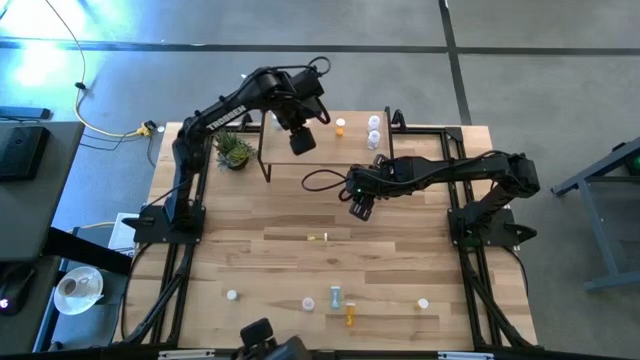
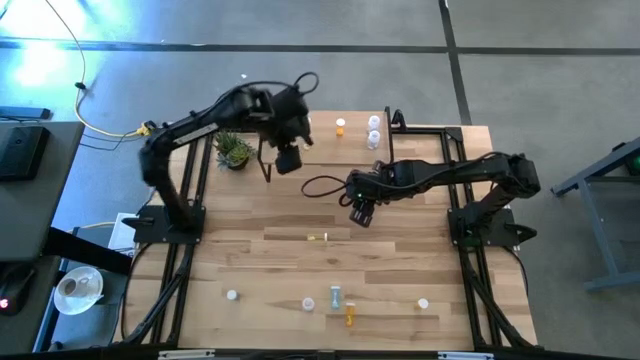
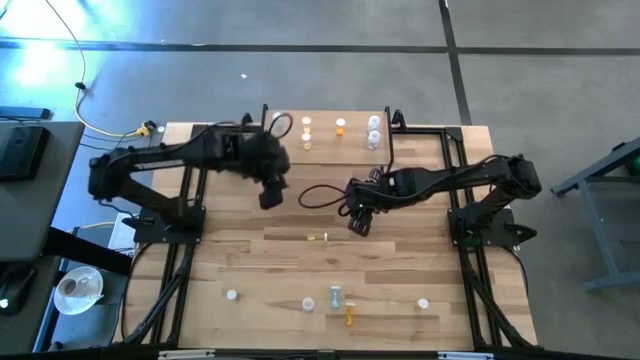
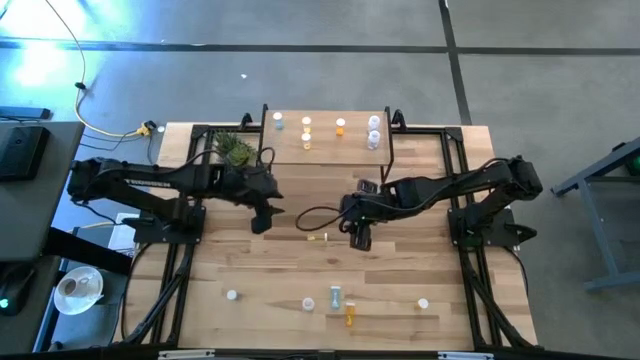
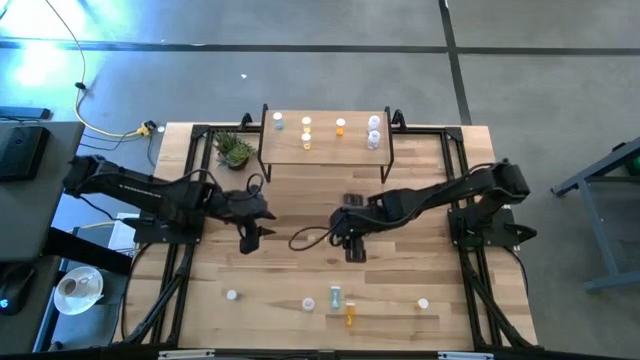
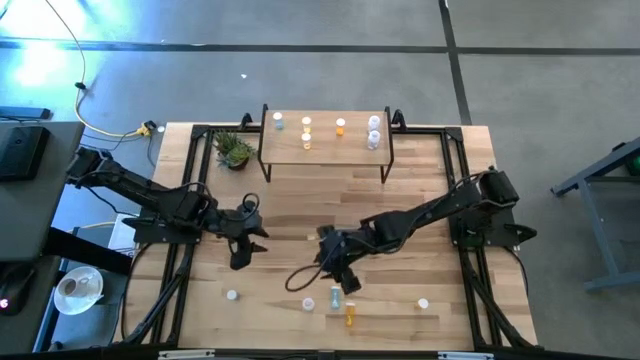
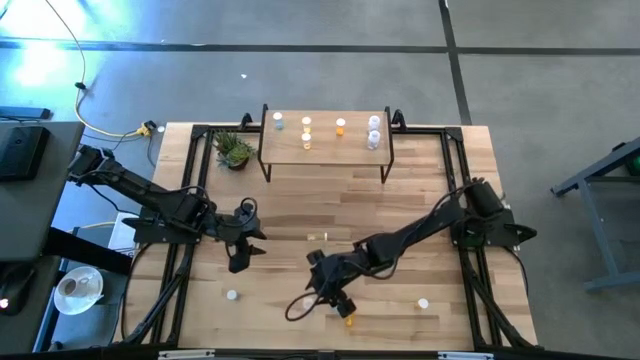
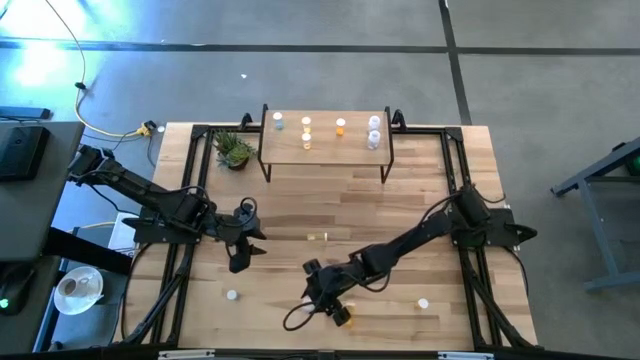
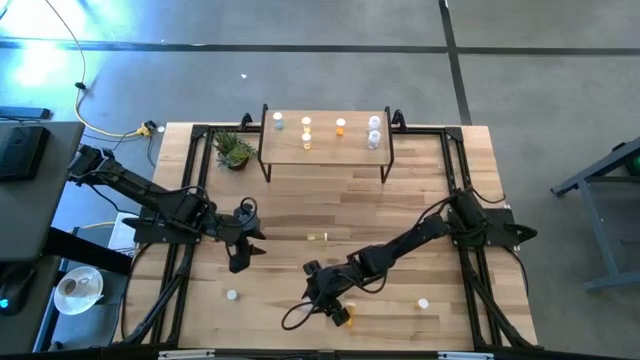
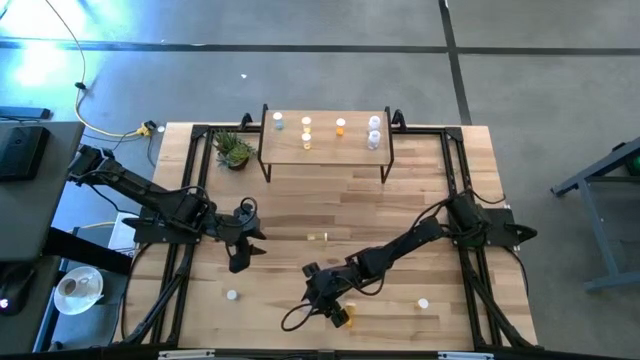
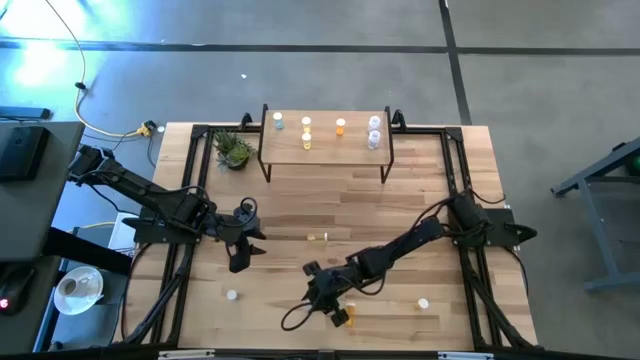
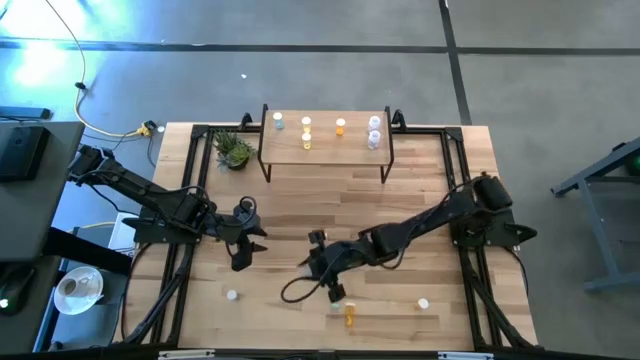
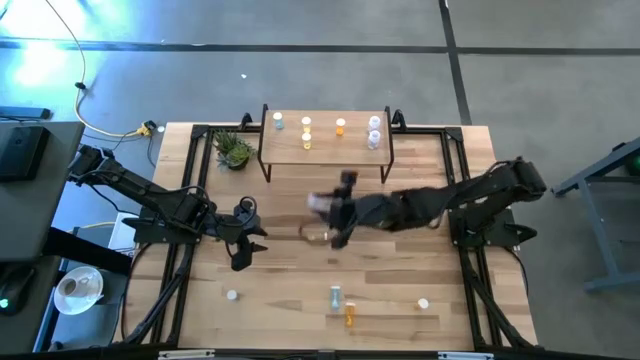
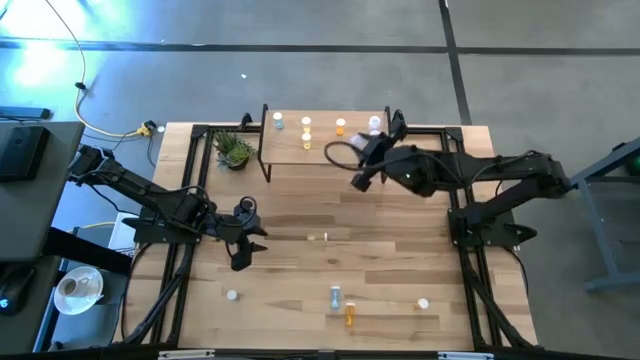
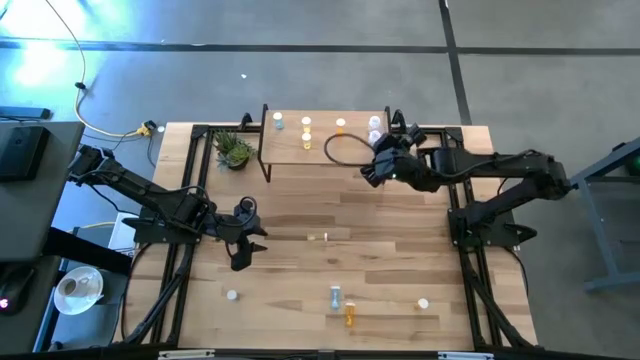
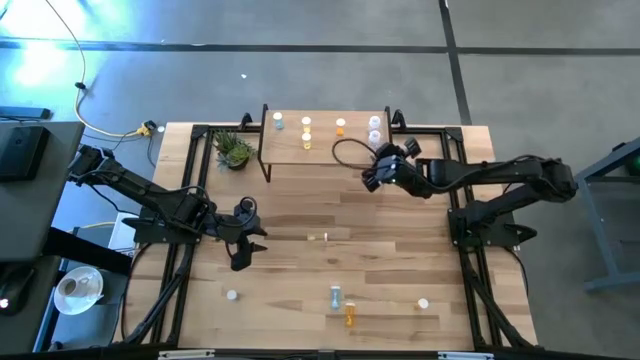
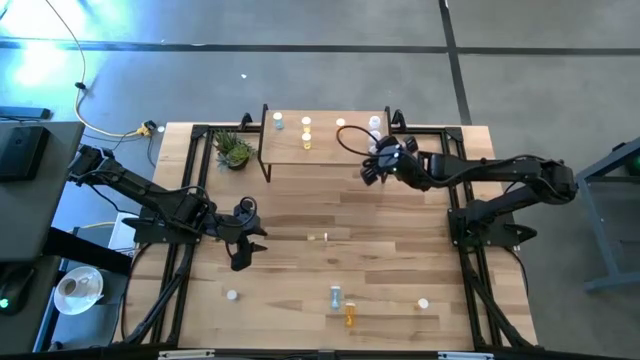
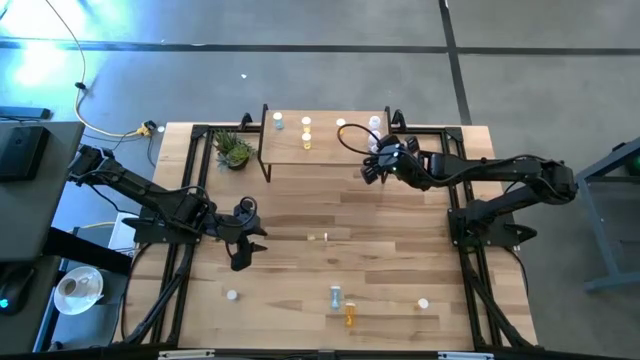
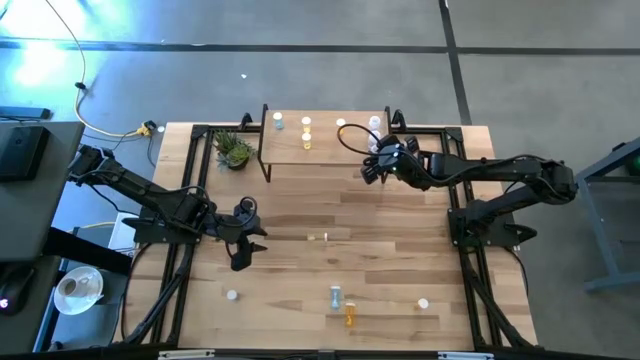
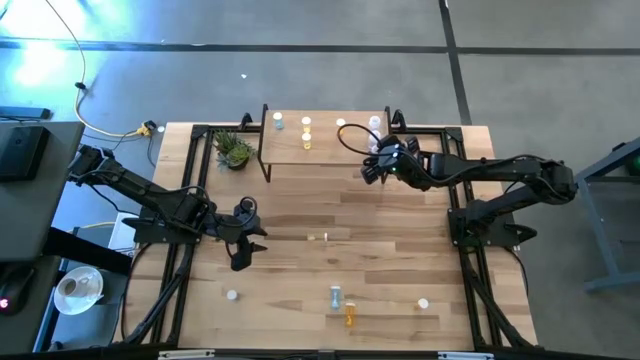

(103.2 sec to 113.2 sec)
Task: Pick and place medicine bottles onto shelf by color
Put the transparent pill bottle on the shelf aligned with the transparent pill bottles

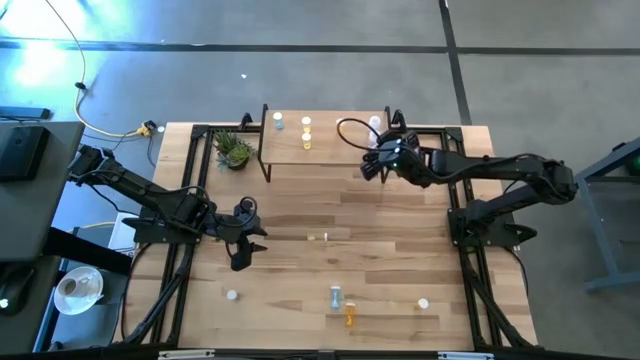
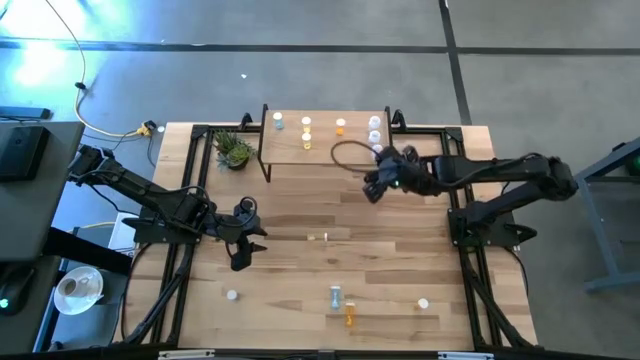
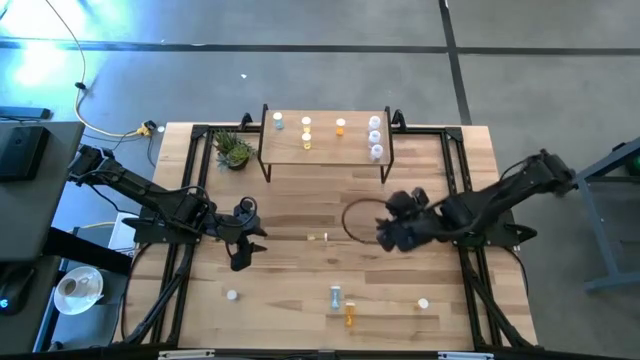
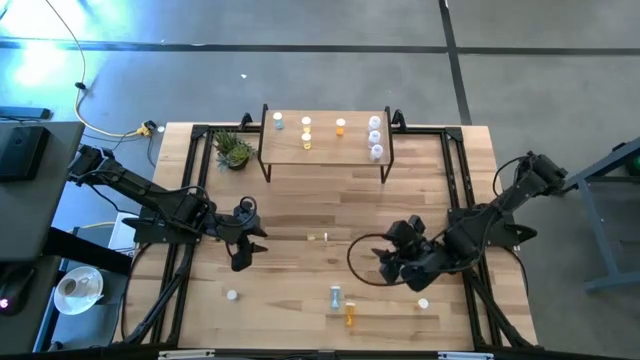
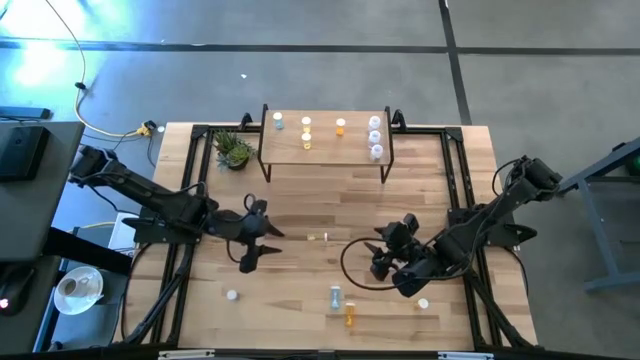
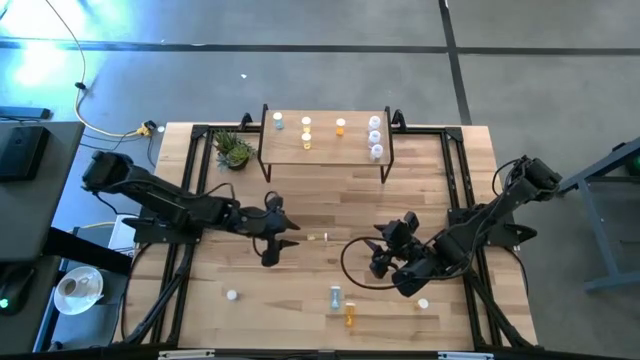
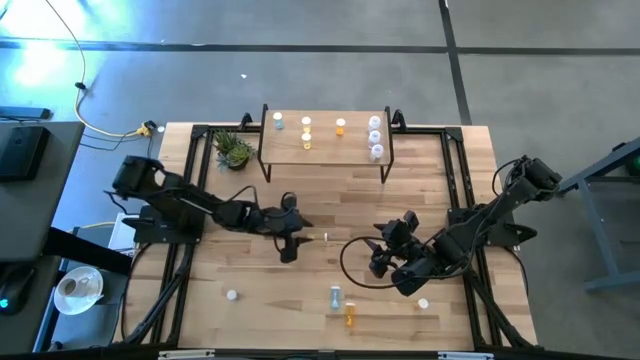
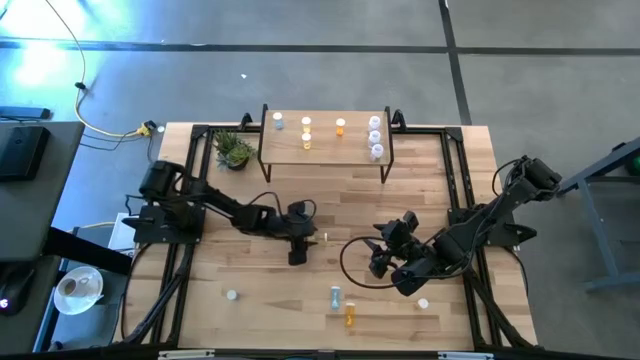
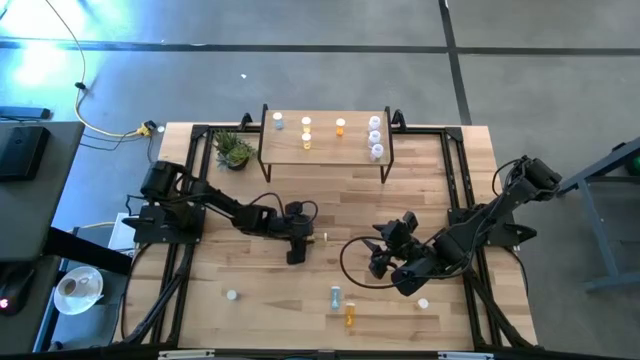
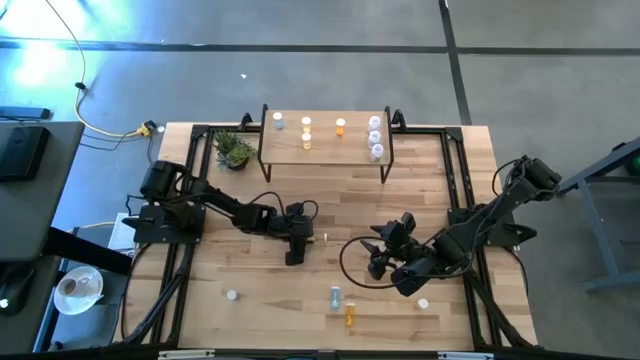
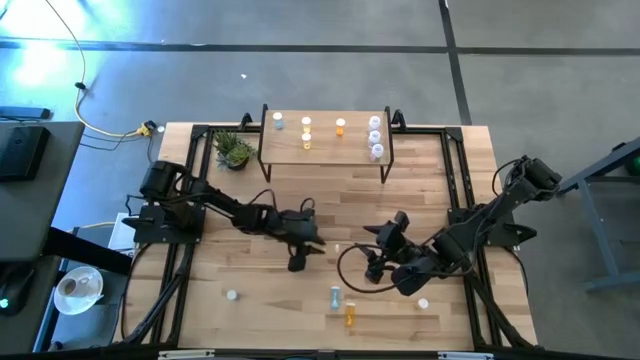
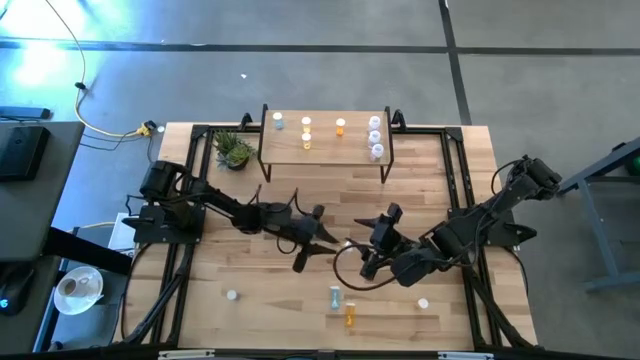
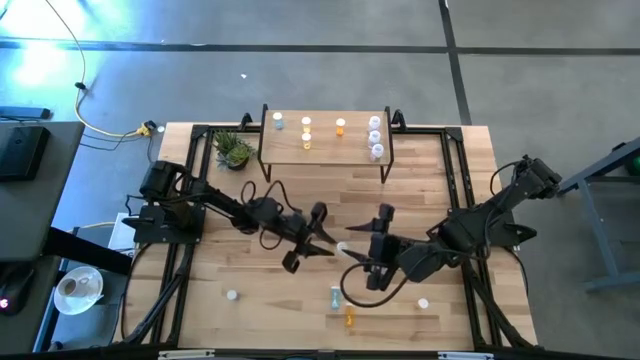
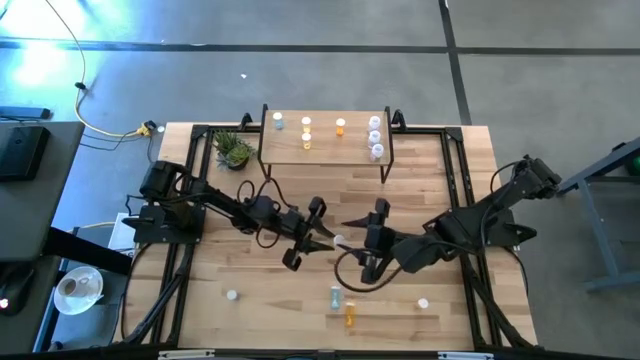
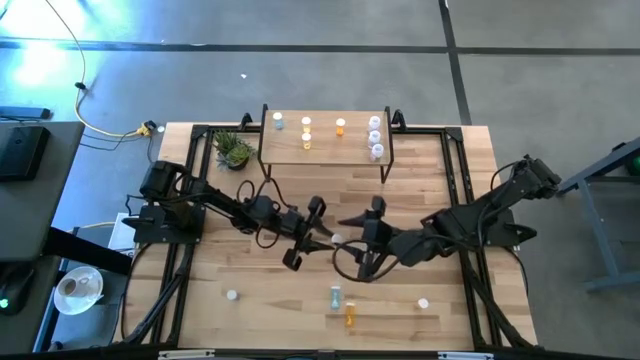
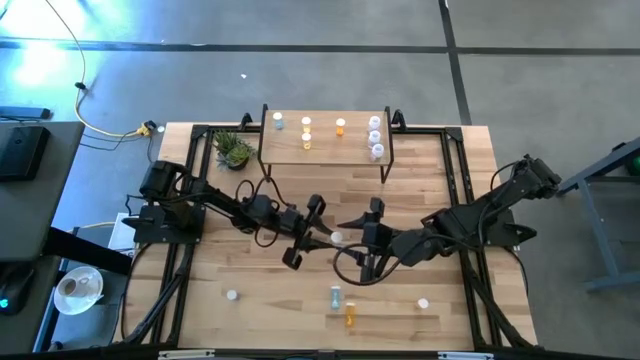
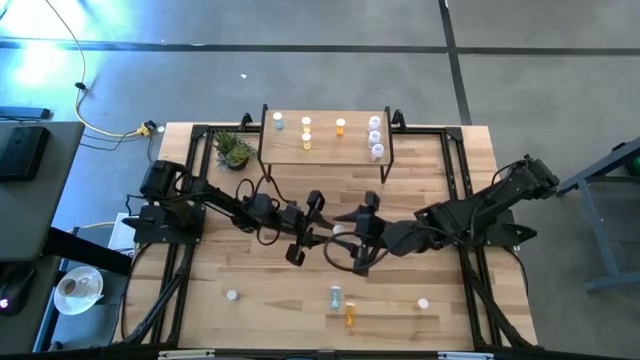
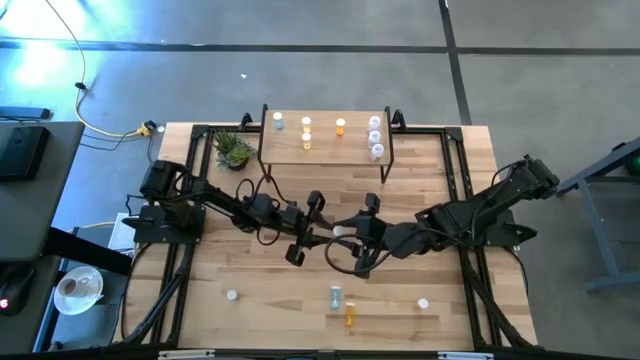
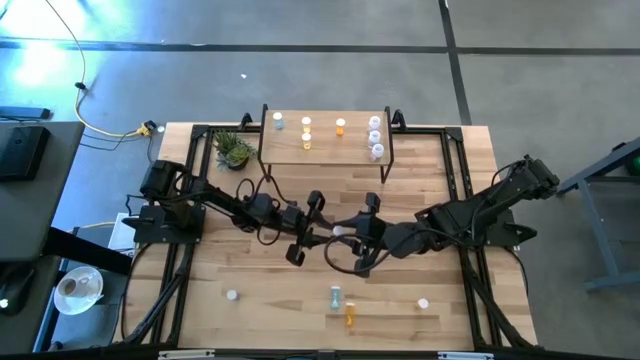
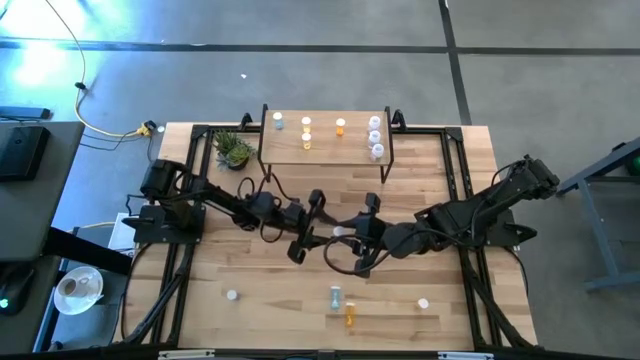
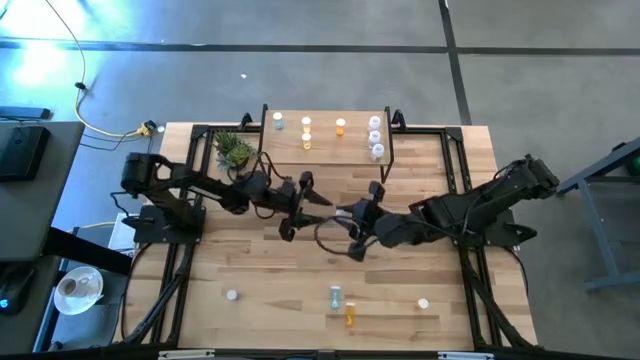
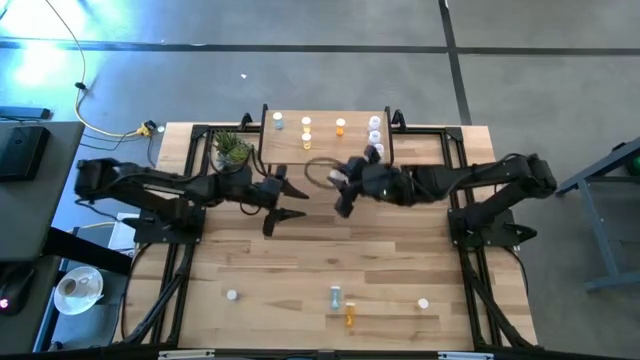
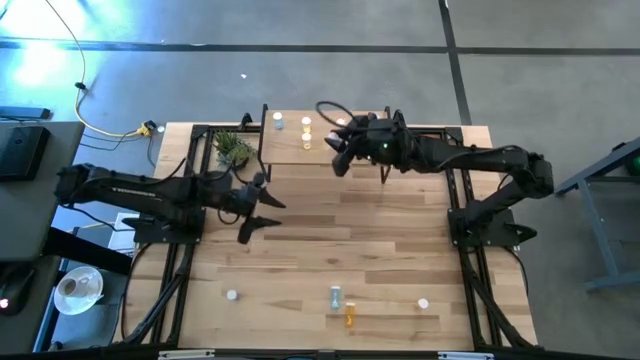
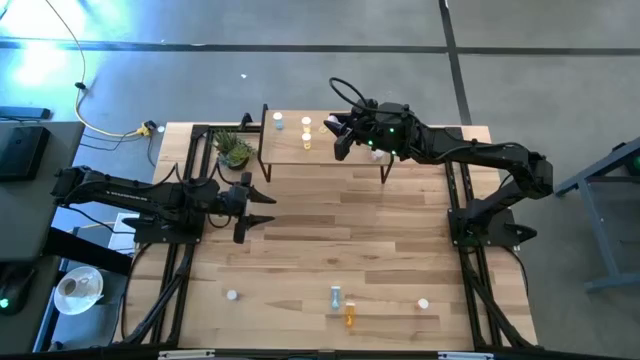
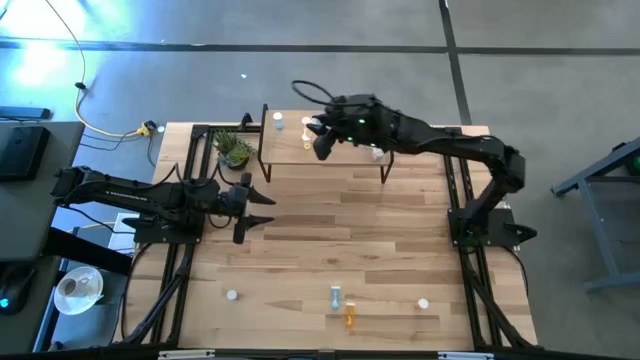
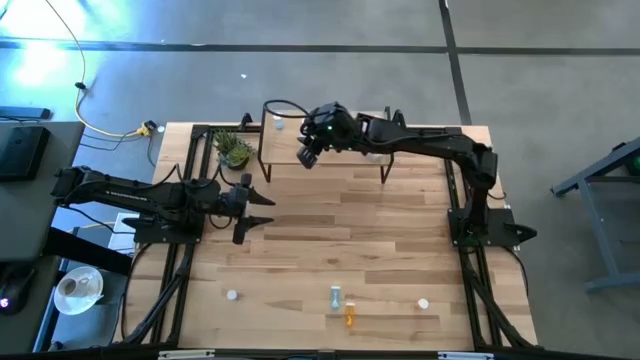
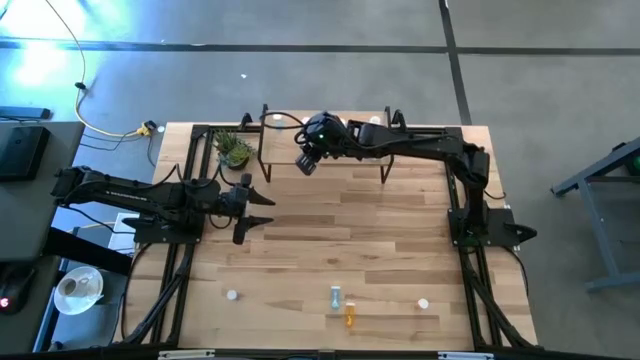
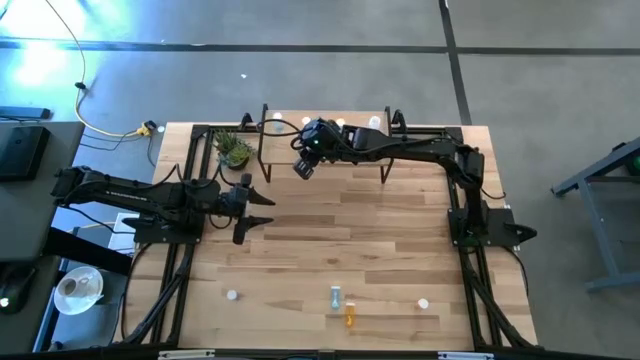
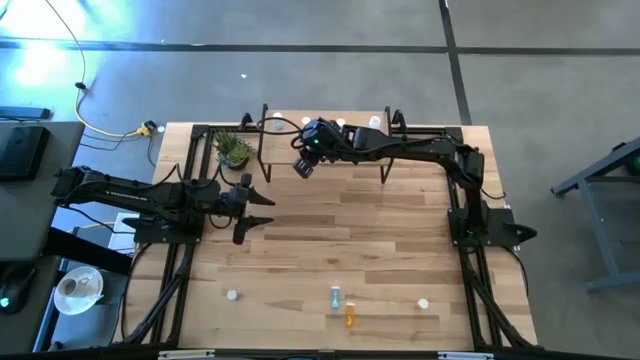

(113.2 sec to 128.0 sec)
Put the yellow pill bottle on the shelf aligned with the yellow pill bottles
